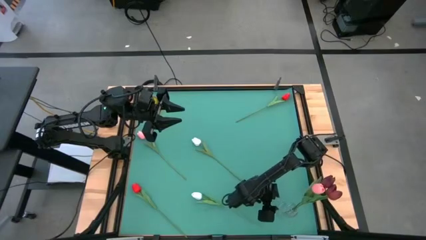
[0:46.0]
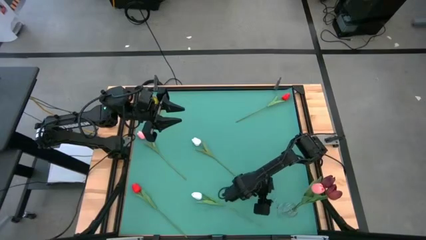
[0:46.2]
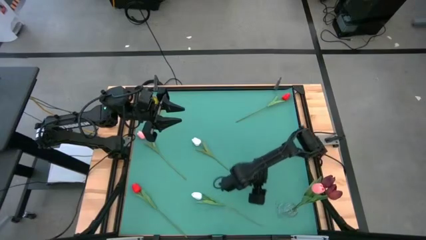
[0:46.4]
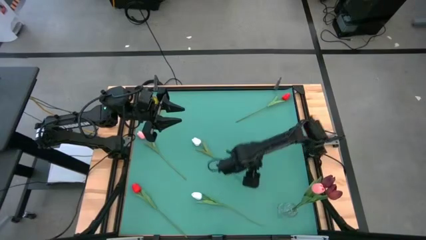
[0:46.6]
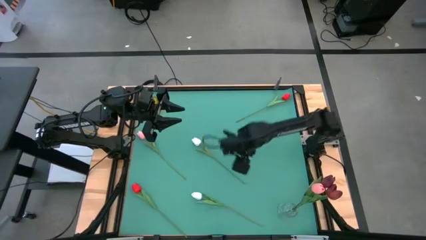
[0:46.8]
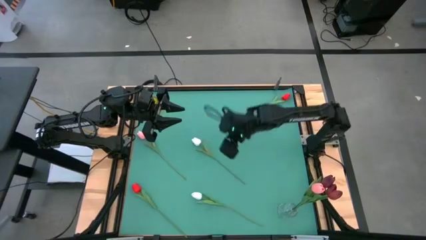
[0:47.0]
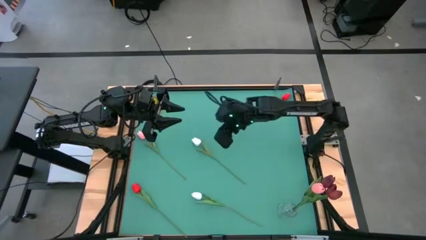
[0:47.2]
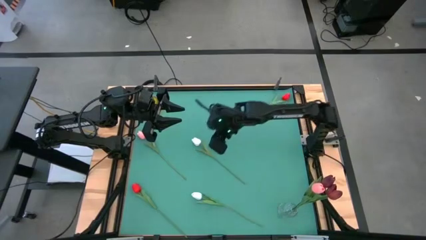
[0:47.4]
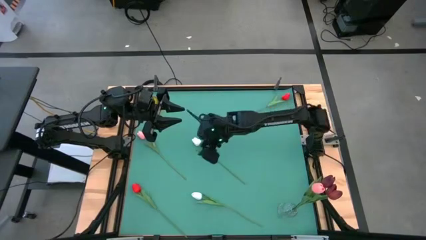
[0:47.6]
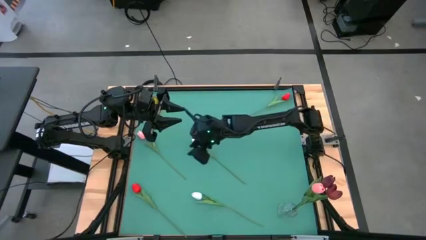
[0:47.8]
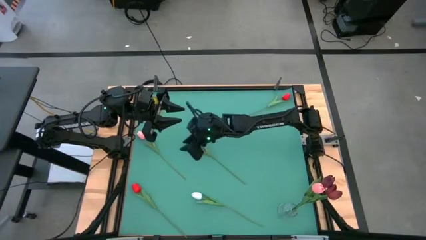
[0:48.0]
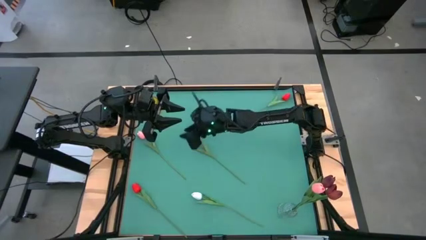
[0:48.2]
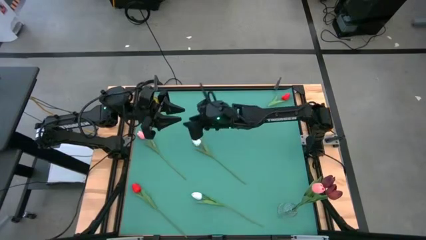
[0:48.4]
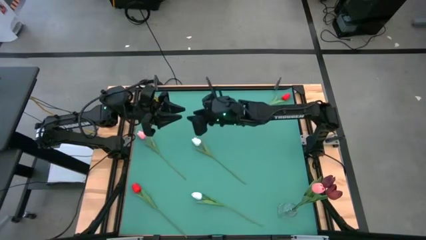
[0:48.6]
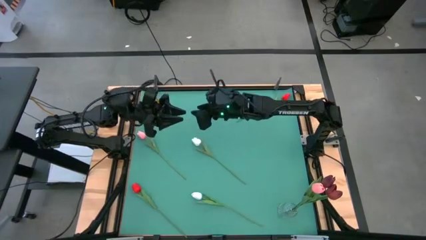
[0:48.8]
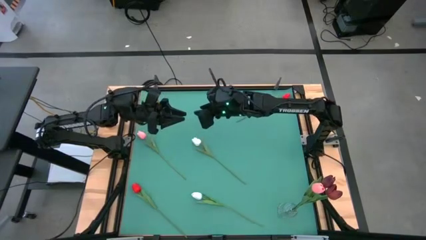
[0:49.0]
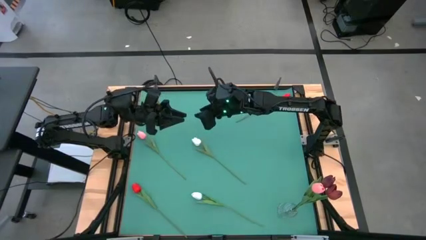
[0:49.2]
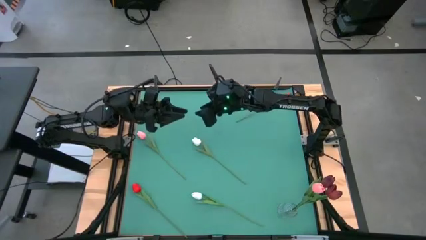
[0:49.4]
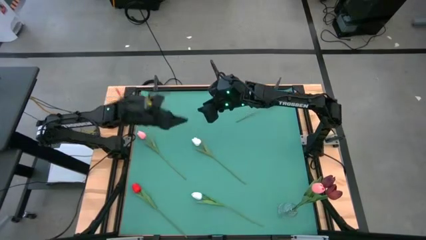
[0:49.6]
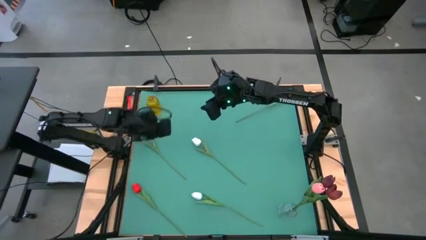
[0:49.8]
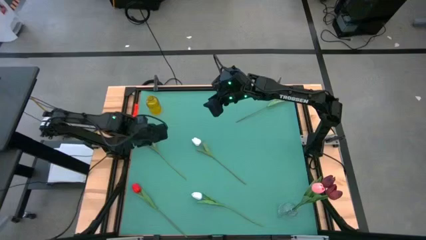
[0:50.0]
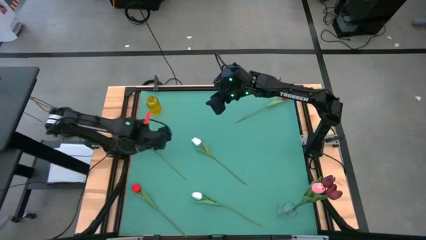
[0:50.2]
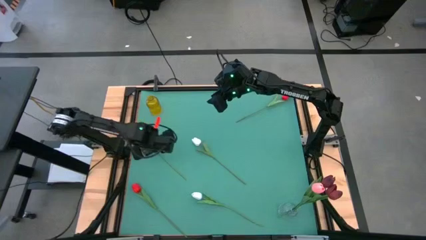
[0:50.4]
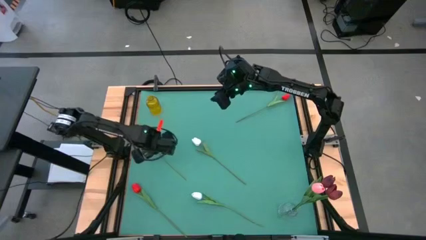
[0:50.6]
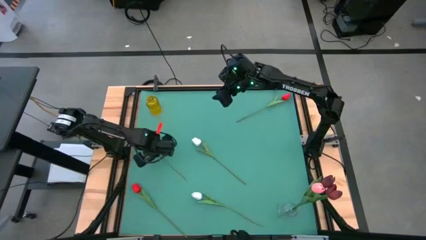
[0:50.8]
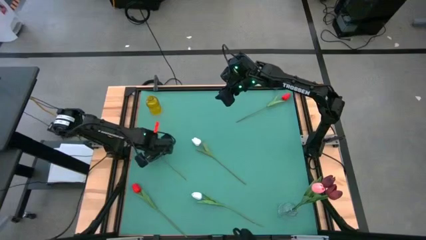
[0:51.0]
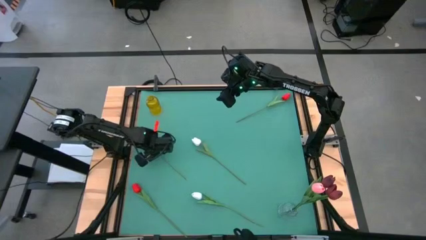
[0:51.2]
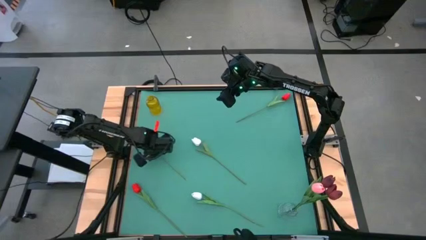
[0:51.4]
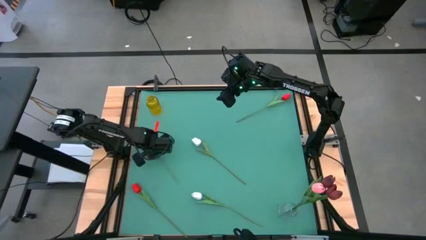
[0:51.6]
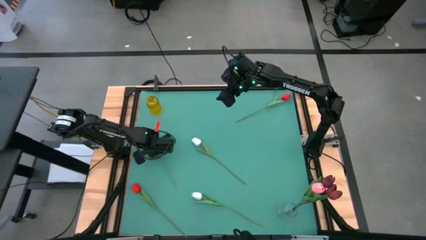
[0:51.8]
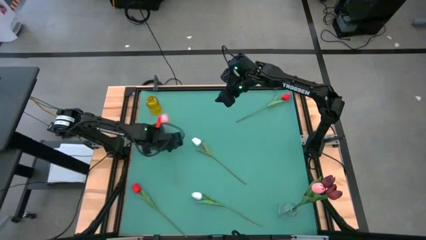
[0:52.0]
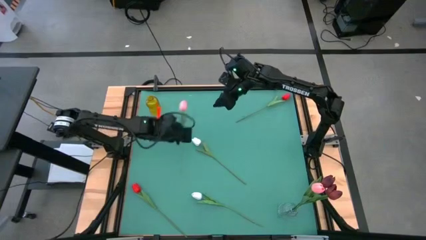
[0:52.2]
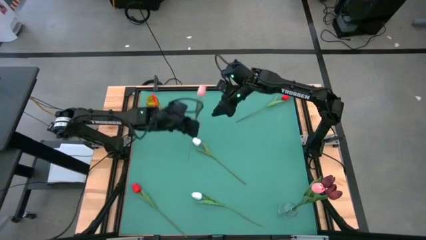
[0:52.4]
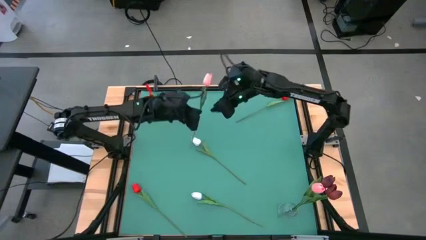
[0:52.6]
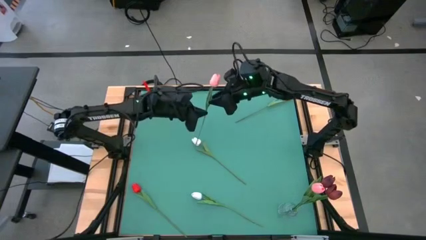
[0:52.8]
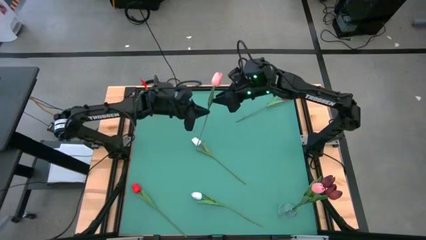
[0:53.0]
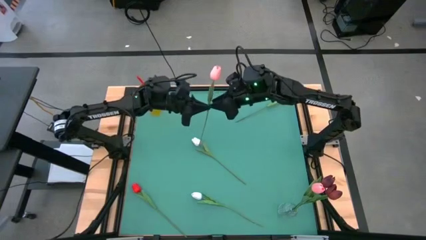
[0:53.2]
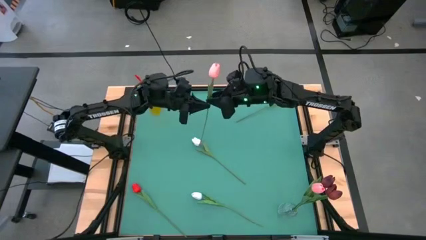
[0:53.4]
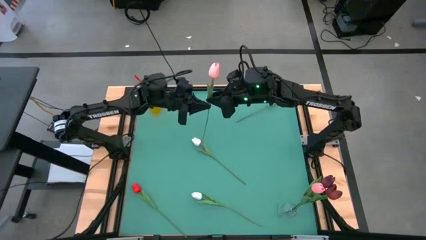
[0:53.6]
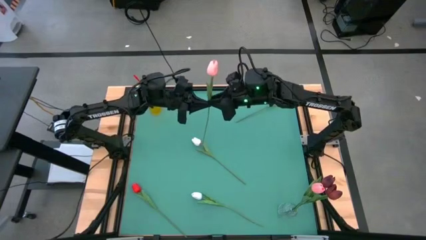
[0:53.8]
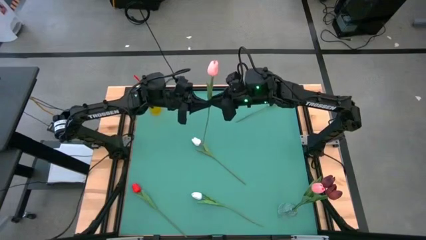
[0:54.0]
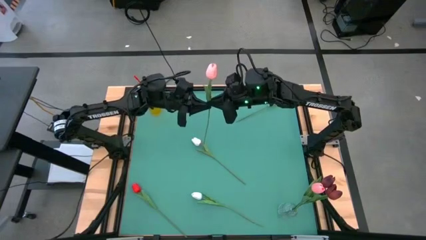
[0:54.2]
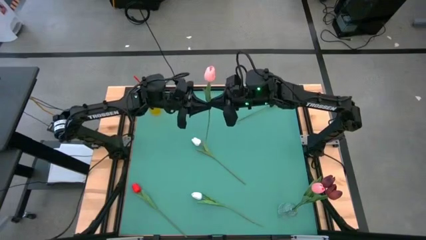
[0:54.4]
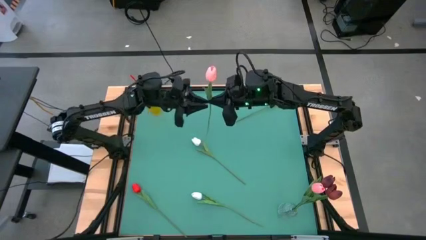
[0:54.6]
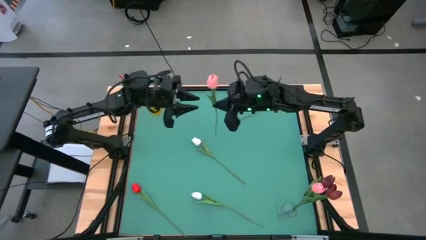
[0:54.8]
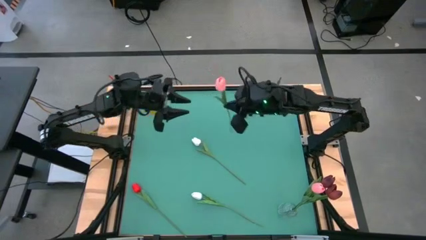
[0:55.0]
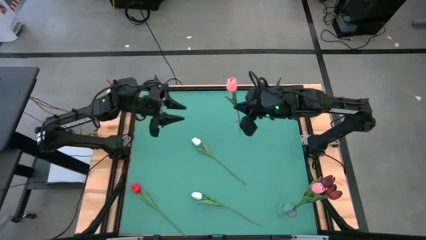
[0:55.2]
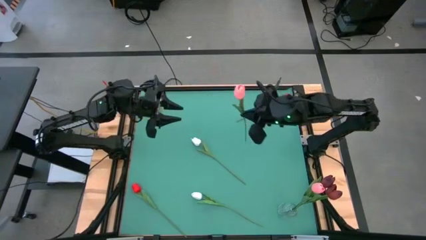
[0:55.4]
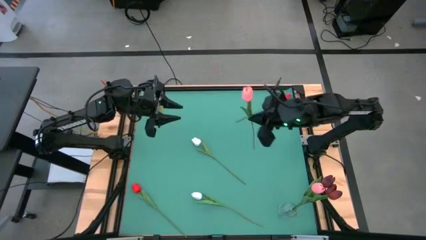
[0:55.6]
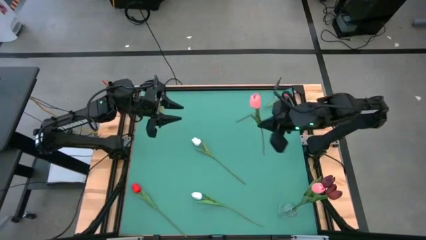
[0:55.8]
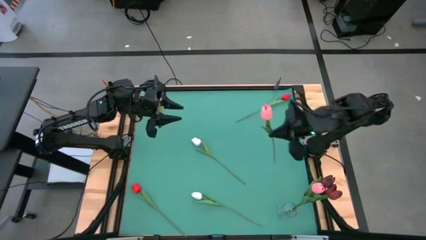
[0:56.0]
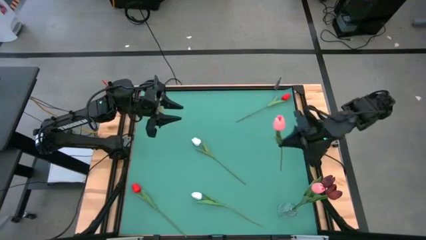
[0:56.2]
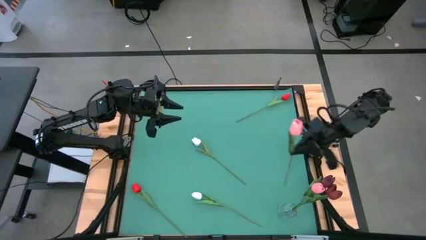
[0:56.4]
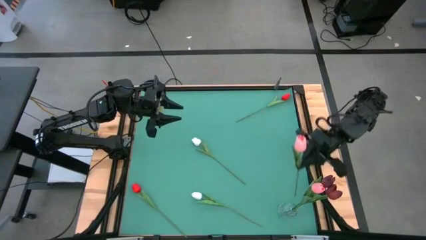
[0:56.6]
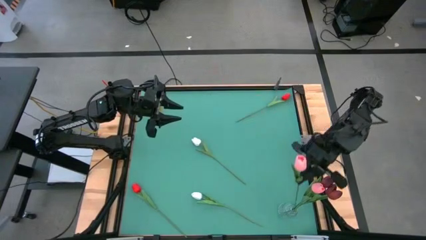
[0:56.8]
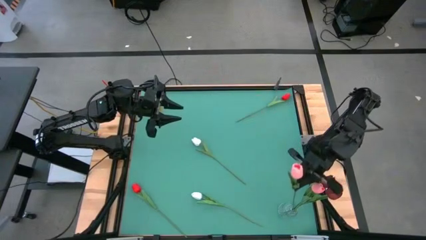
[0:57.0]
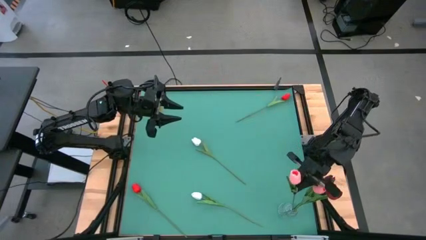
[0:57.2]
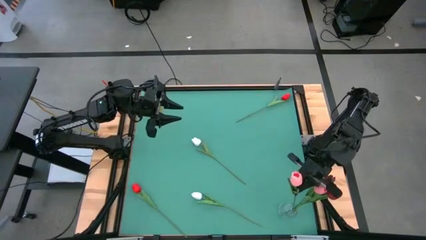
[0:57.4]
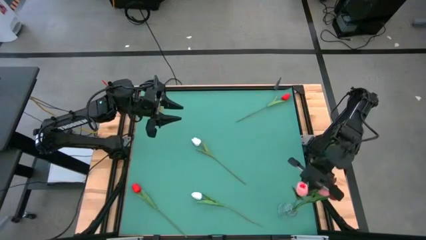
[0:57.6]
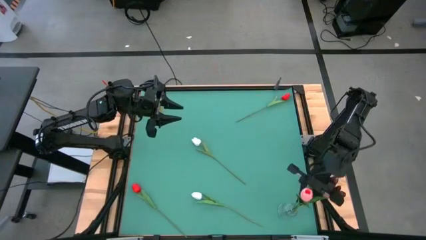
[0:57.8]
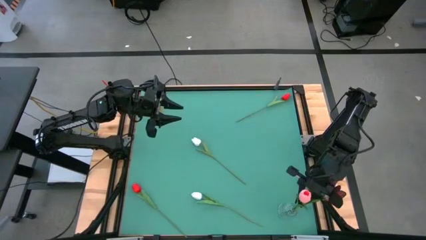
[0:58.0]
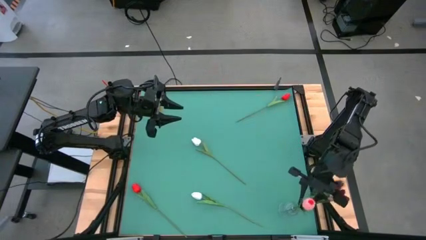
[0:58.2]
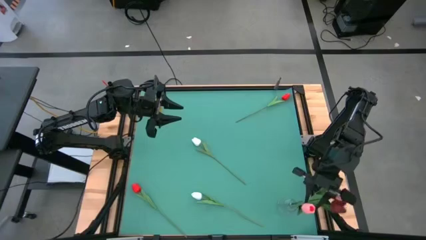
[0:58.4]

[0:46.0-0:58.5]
Task: Sort flowers into vase by color
Put the pink tulip into the transparent vase
